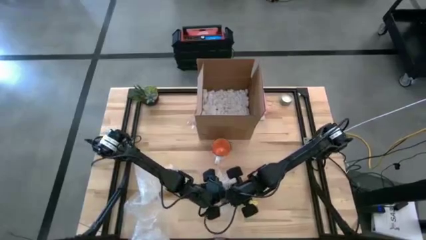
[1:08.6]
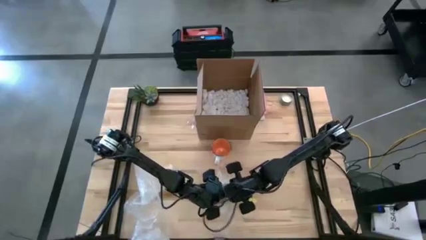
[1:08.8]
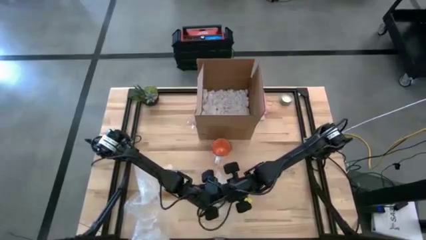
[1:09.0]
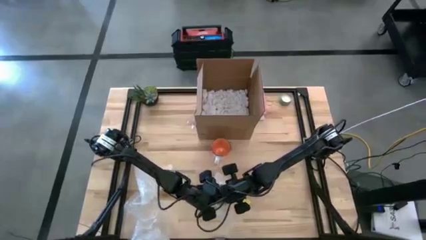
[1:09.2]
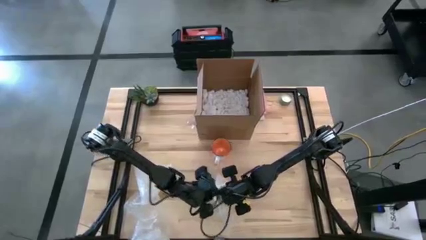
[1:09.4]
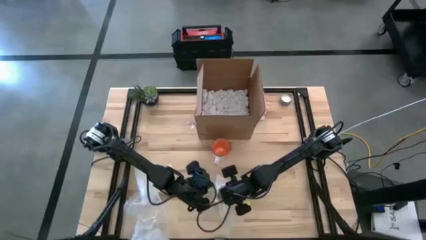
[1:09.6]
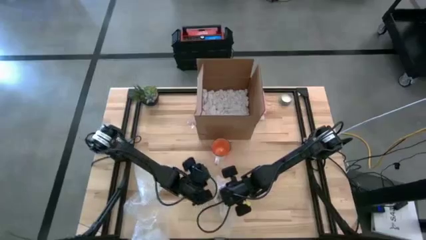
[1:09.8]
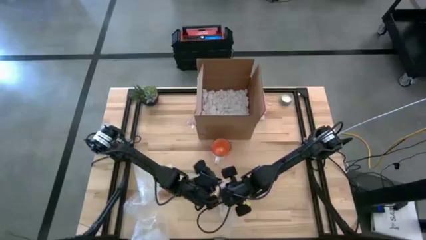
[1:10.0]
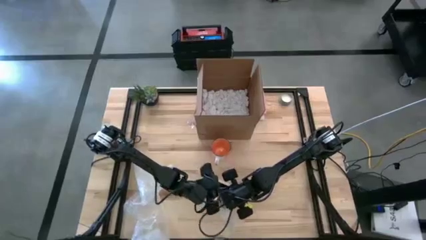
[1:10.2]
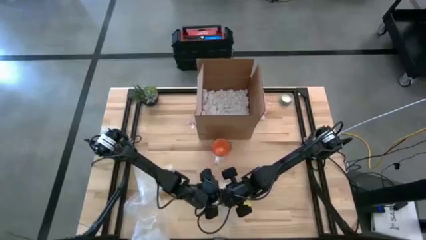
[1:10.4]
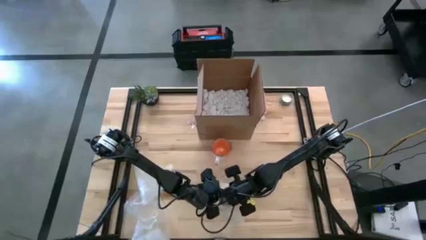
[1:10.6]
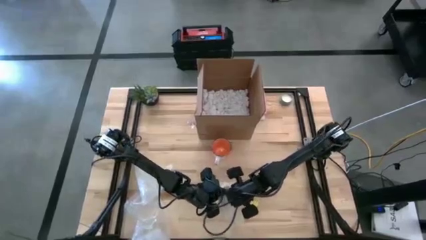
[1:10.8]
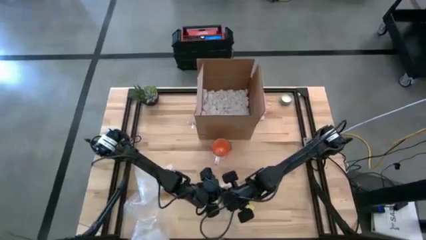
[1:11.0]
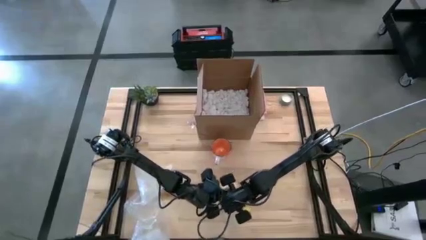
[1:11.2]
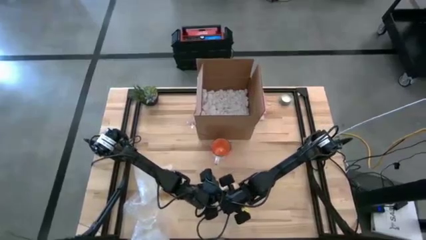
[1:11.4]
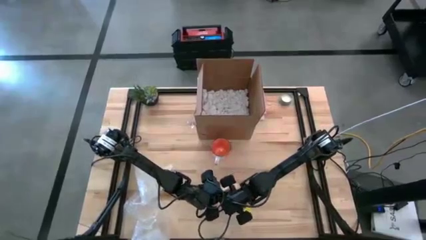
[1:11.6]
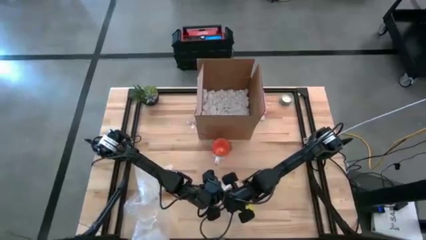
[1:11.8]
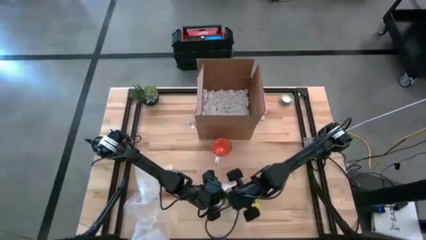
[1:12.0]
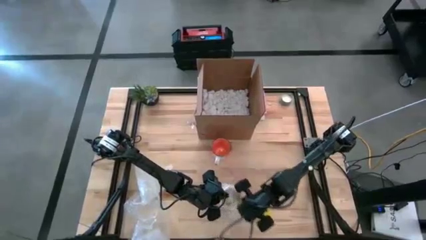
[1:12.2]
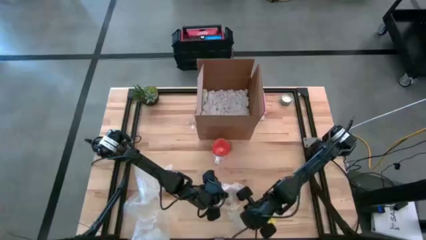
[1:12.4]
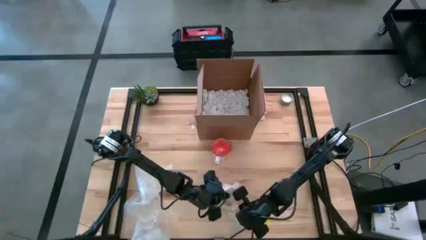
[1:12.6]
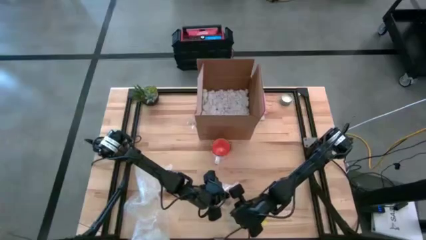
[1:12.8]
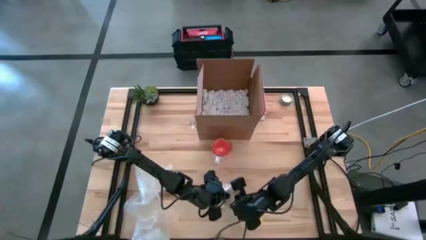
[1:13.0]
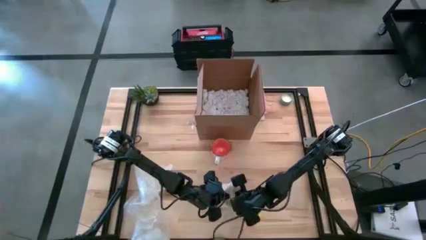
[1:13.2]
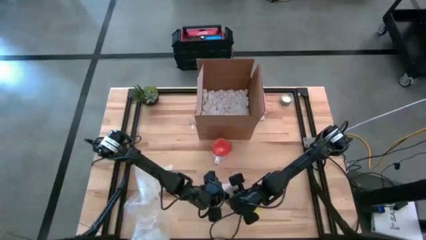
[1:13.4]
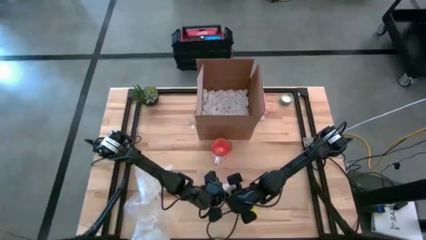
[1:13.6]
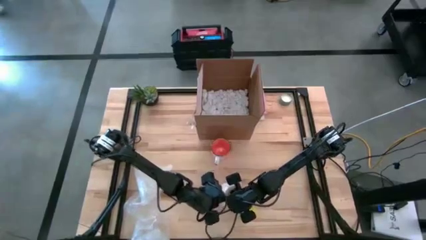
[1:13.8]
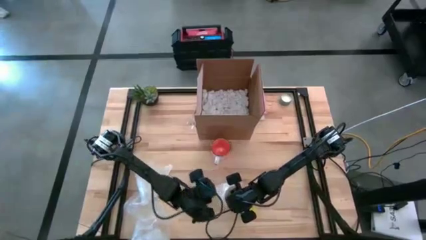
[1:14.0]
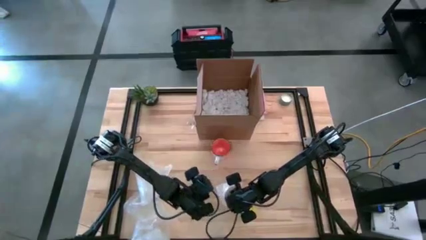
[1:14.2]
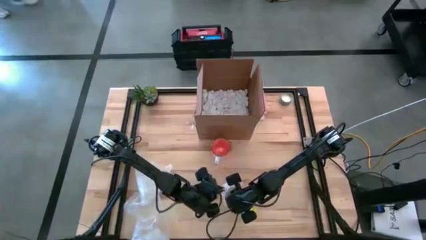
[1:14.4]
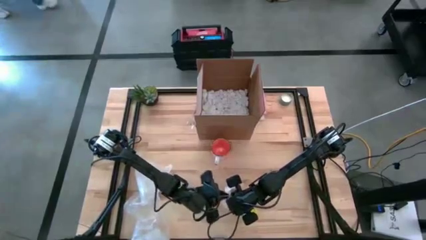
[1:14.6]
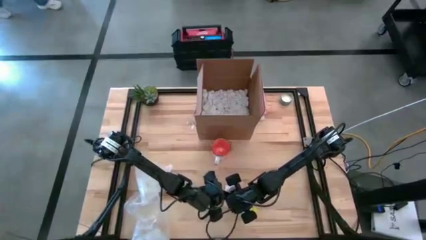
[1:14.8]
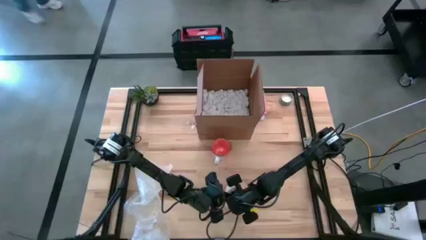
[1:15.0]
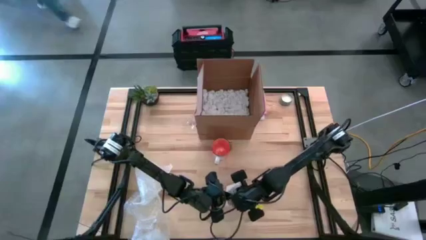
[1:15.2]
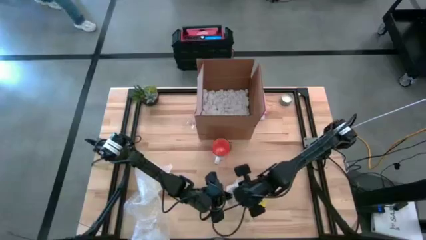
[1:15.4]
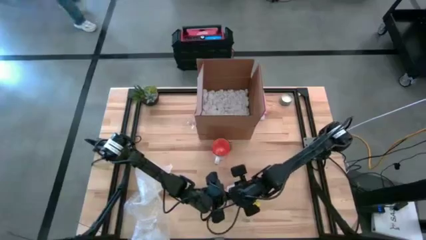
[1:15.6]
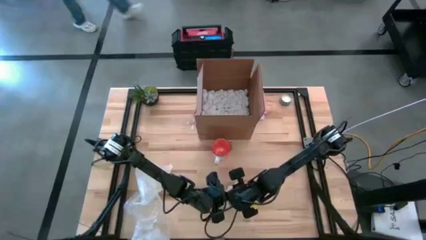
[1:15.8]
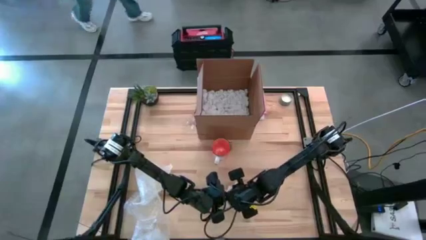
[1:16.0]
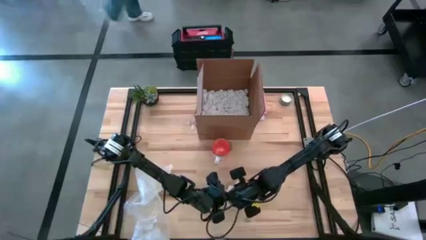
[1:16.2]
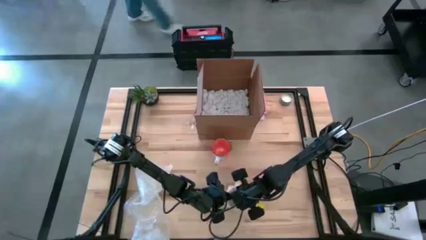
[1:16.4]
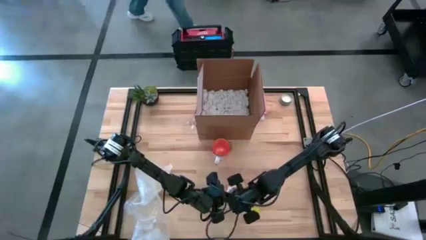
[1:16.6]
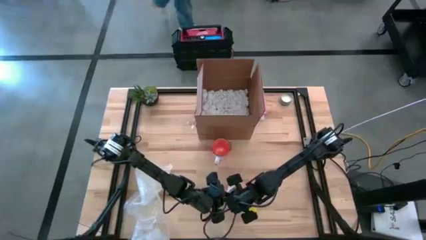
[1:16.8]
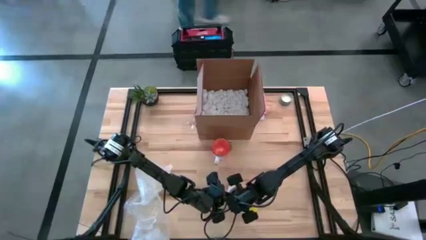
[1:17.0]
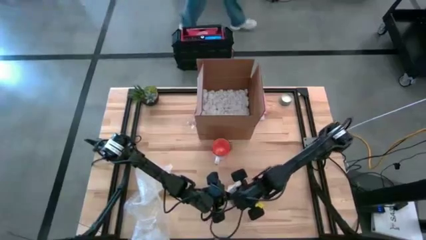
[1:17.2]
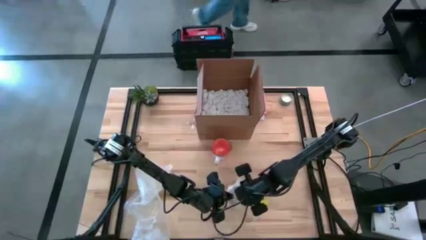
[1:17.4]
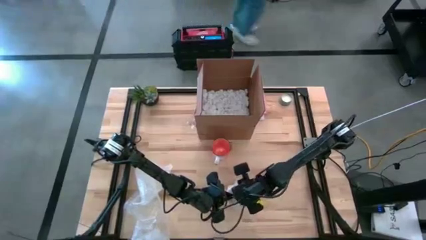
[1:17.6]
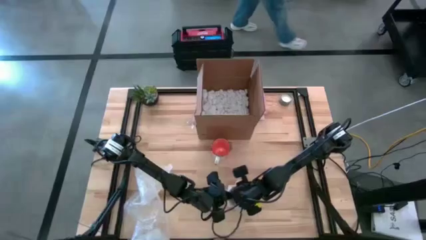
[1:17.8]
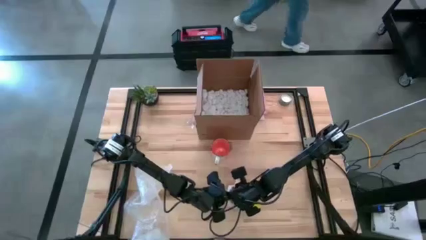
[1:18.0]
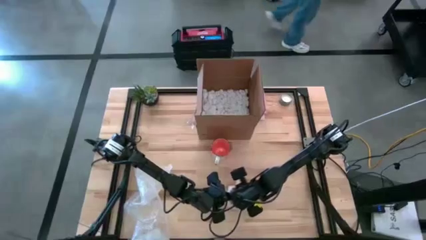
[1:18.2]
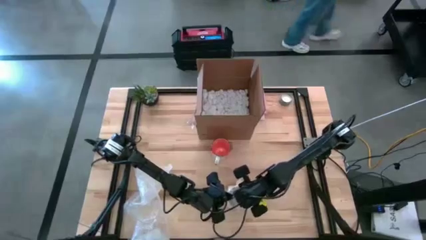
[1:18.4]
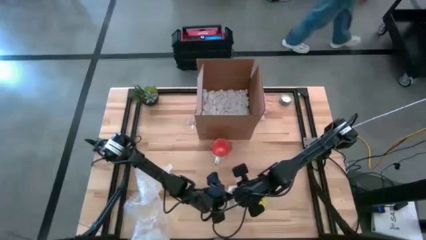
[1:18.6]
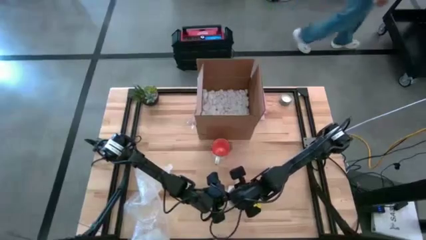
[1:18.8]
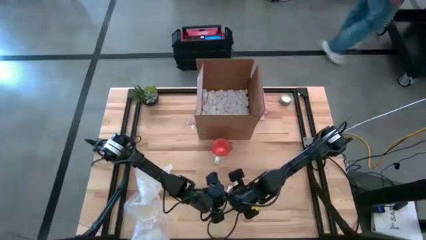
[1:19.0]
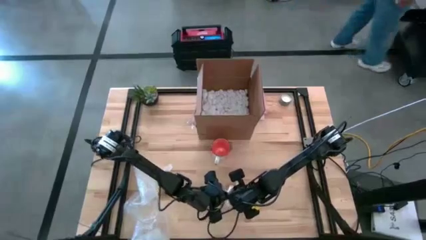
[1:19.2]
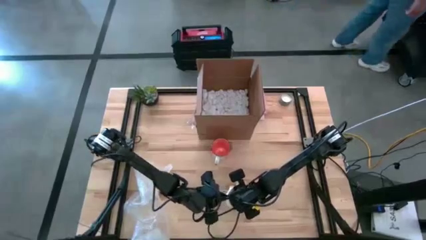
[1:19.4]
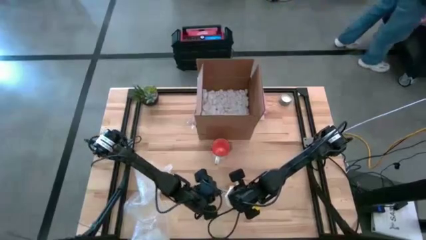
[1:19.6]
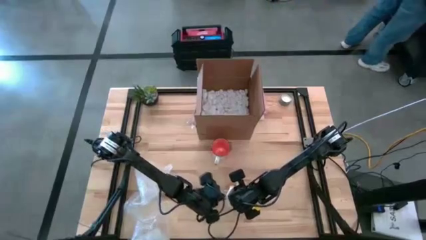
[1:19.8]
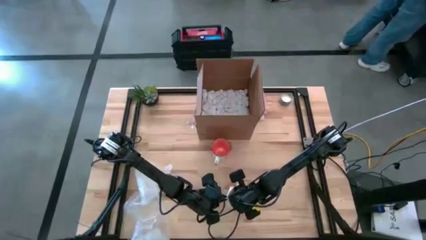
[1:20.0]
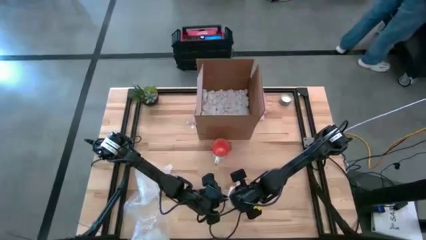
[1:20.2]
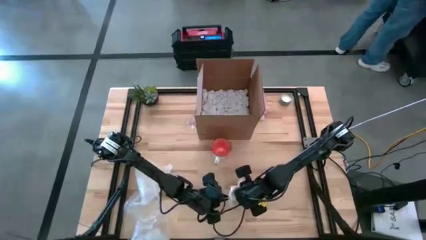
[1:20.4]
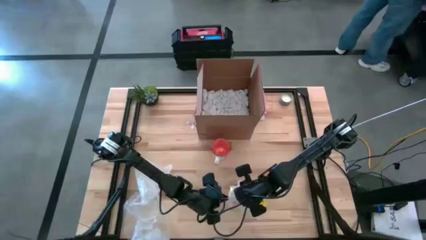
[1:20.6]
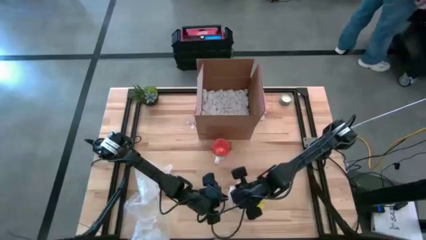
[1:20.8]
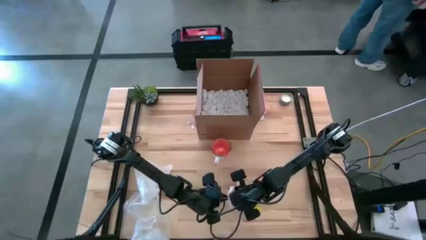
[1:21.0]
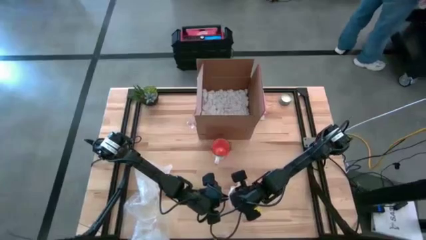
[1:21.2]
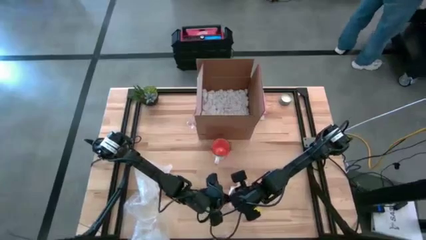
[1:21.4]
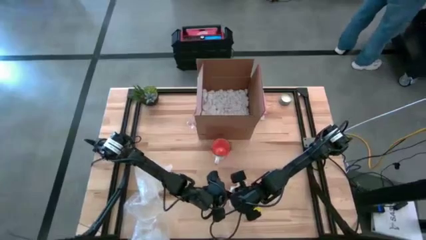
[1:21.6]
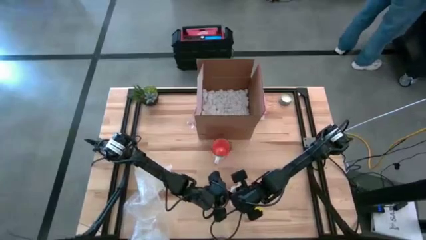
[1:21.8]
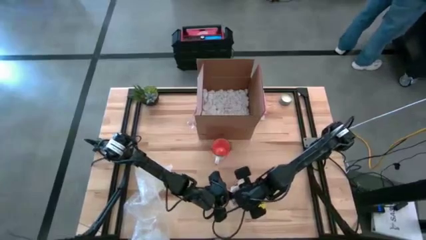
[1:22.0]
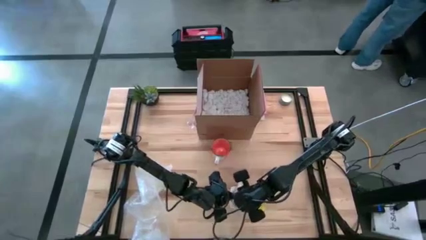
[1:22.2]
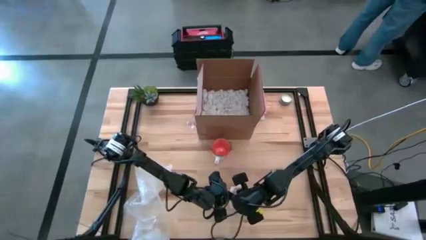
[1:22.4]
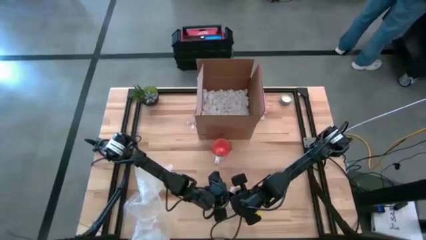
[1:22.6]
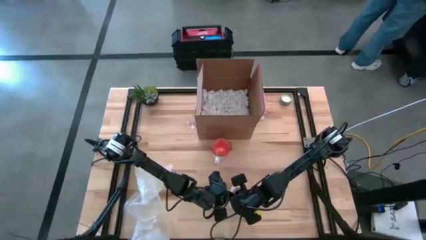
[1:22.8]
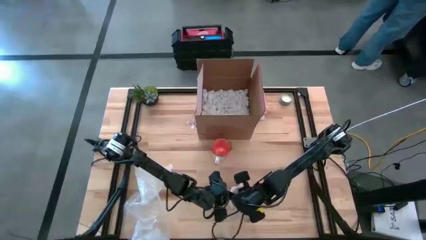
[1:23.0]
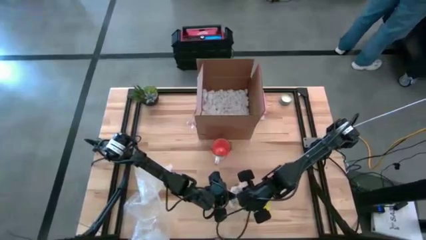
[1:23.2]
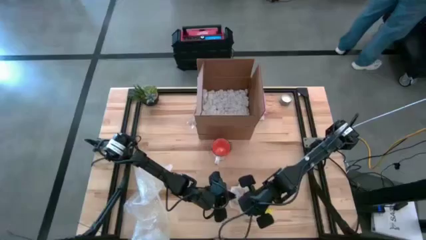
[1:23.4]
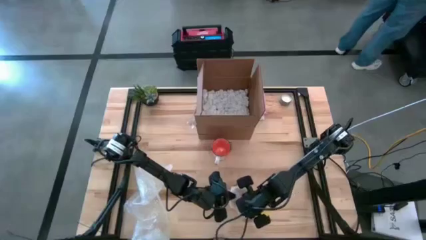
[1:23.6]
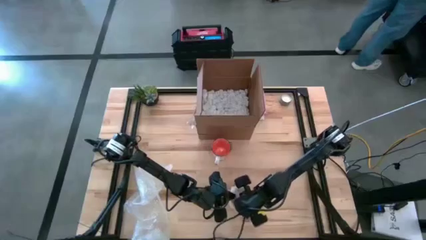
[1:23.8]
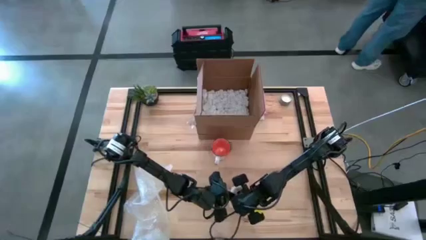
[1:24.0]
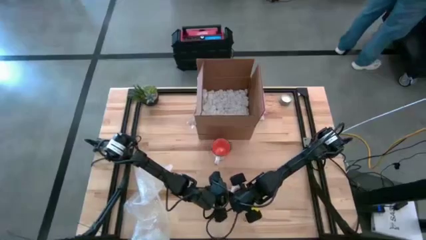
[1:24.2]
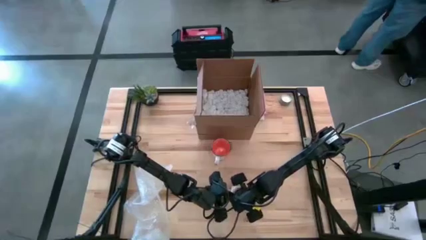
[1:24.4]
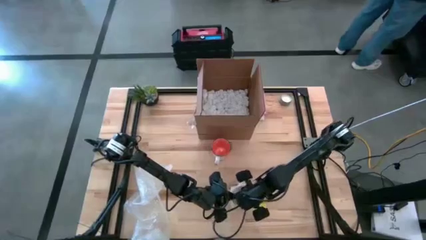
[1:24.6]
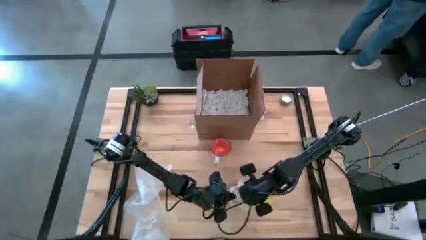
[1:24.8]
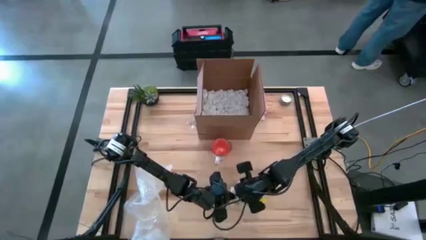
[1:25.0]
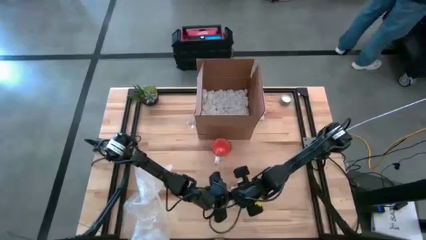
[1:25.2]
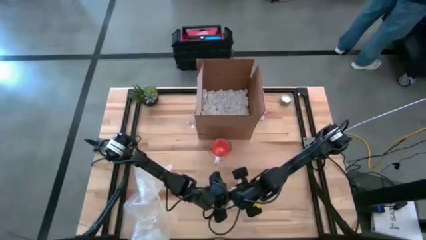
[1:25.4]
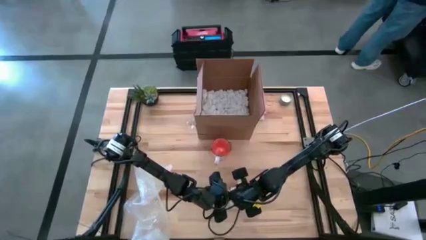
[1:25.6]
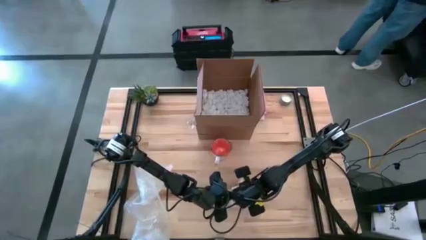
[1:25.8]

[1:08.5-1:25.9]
Task: wrap mug
Wrap the yellow mug with the transparent bubble wrap
